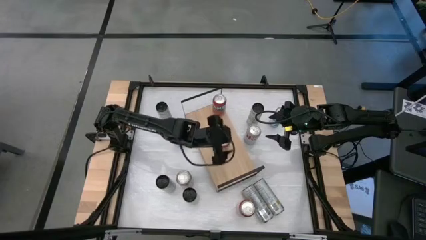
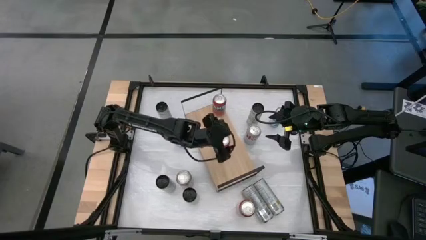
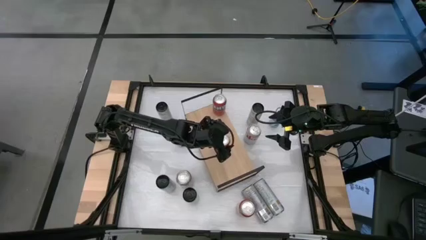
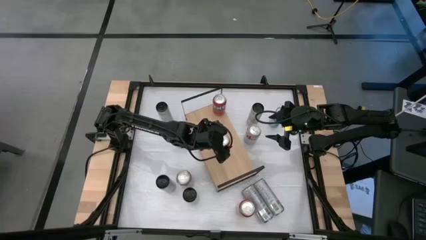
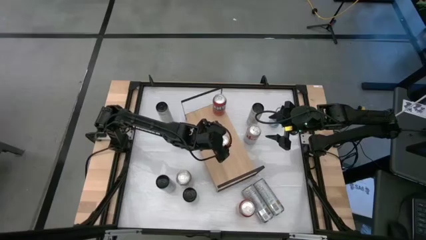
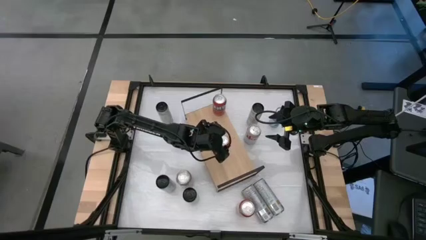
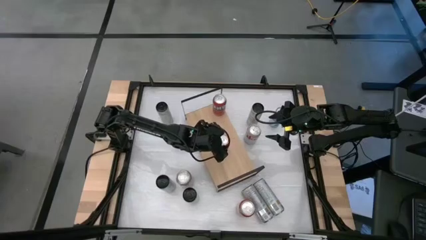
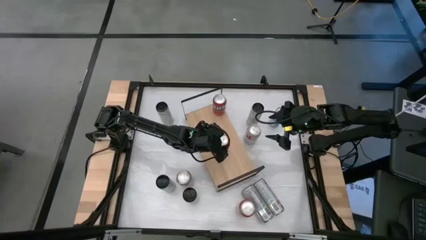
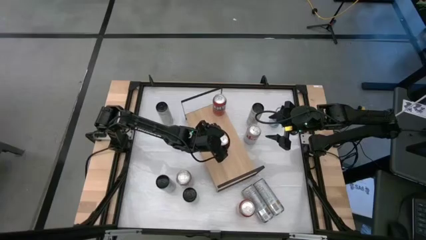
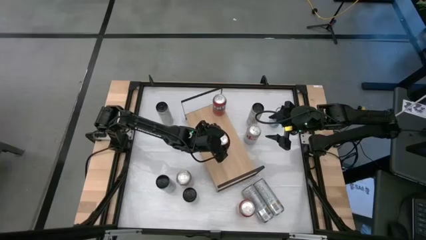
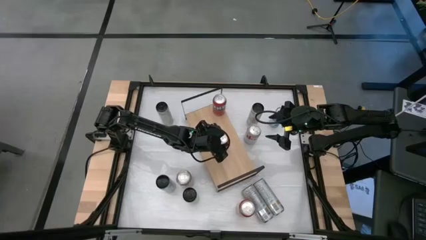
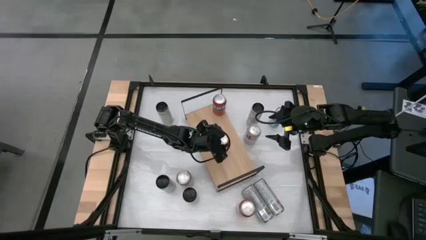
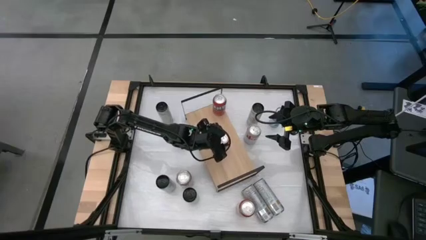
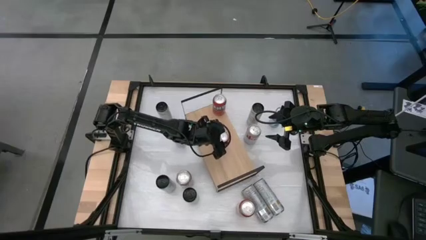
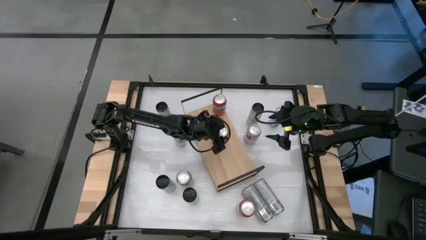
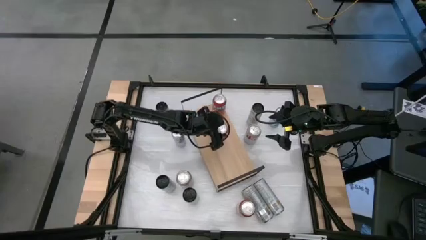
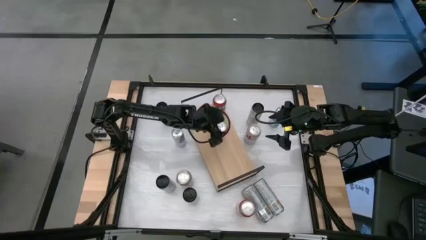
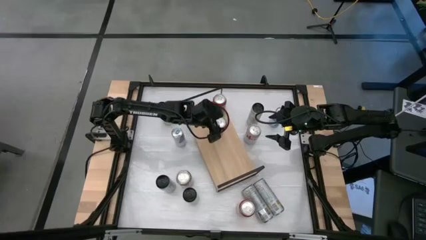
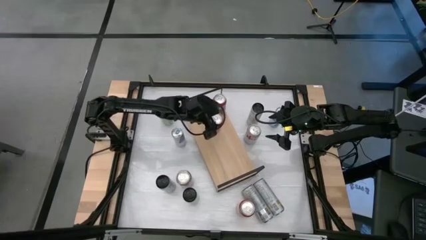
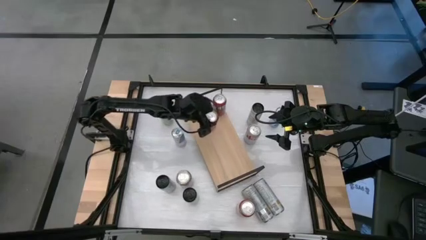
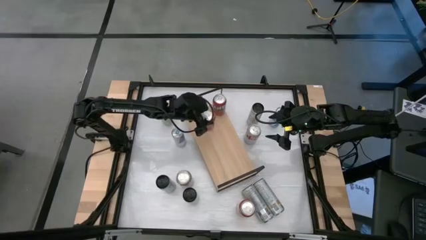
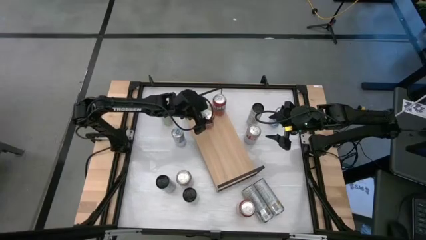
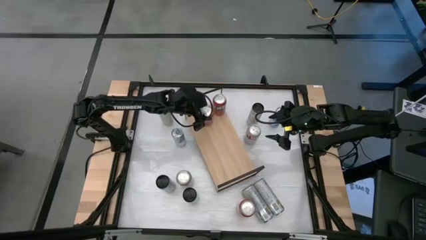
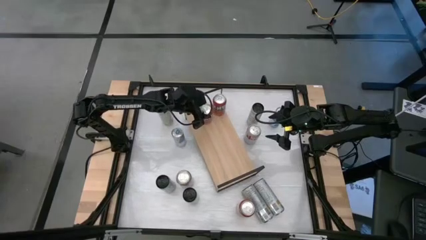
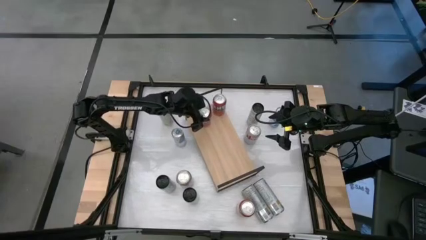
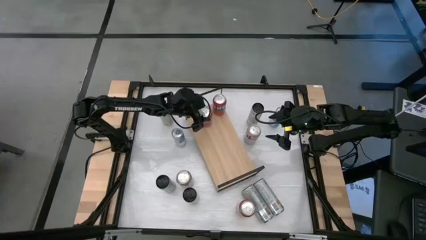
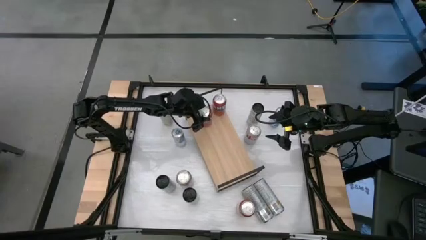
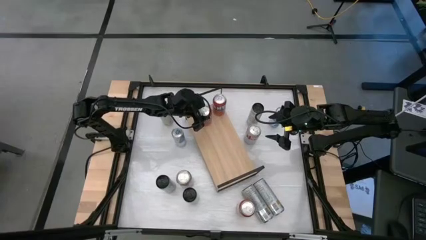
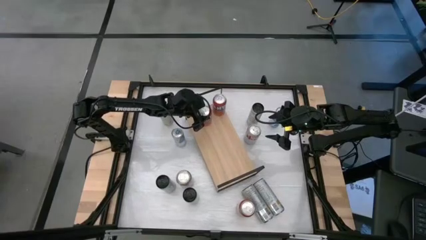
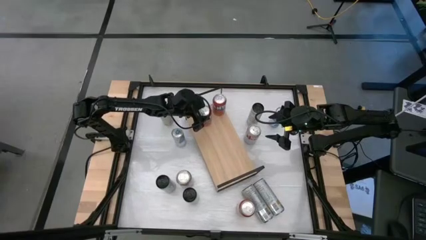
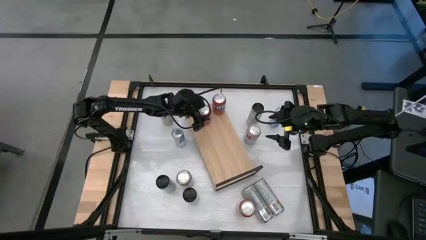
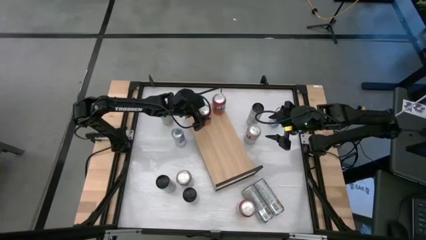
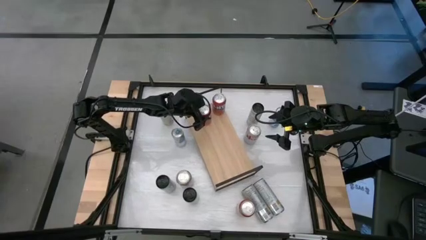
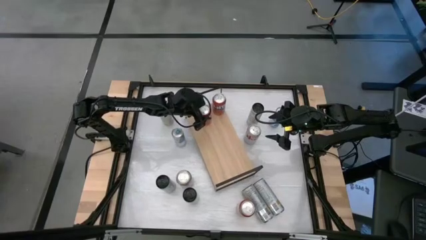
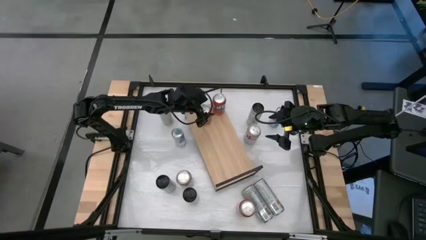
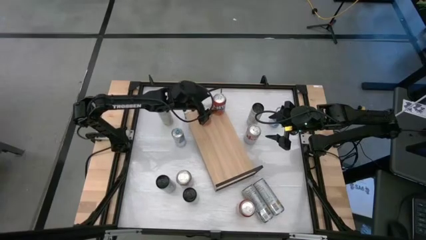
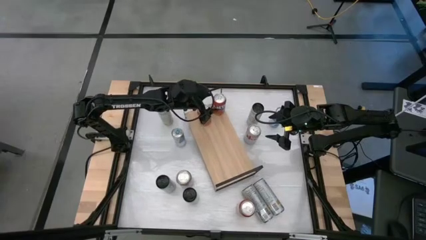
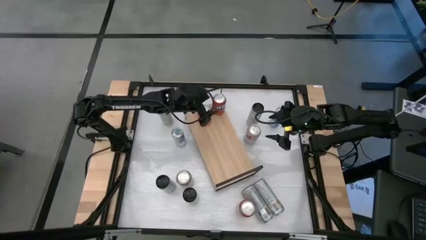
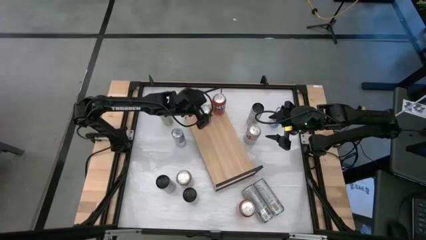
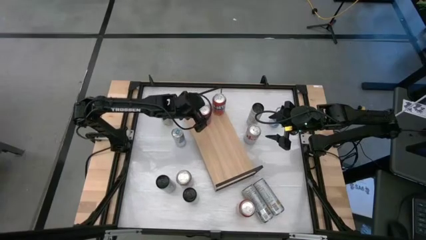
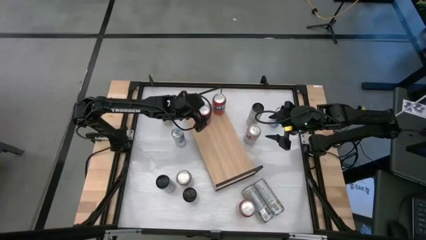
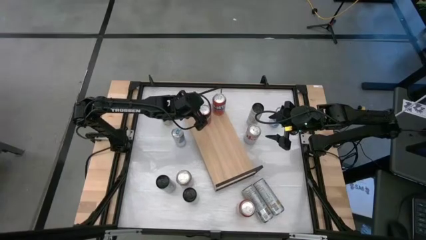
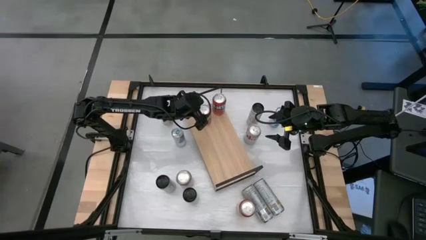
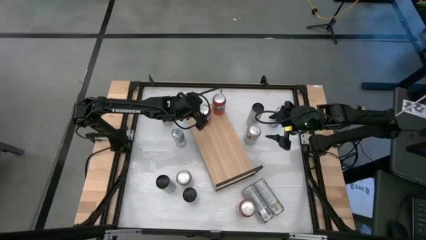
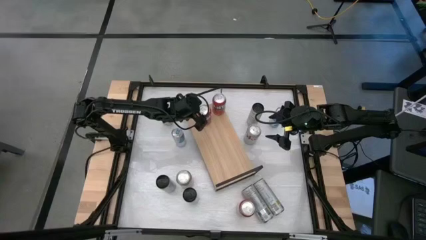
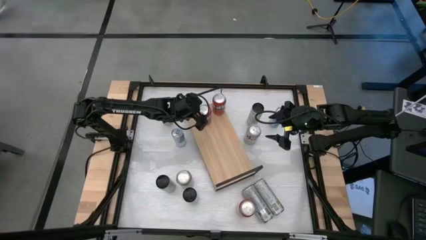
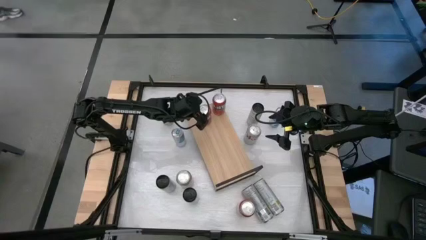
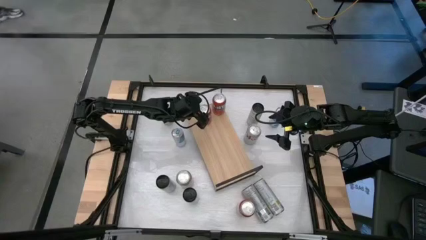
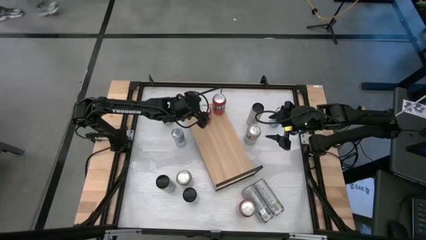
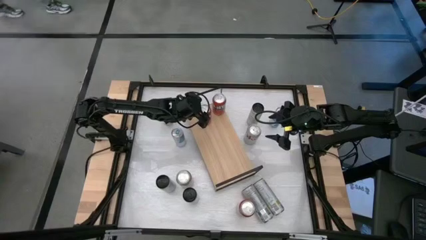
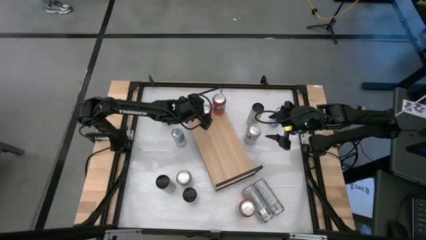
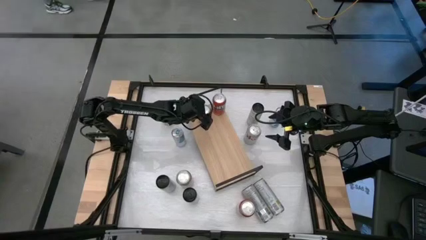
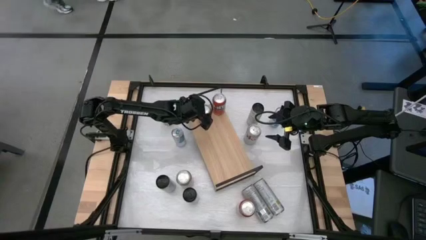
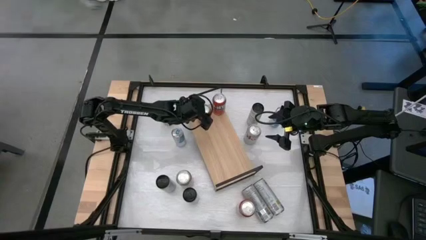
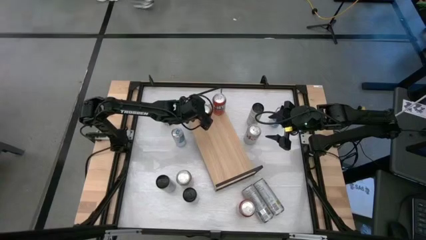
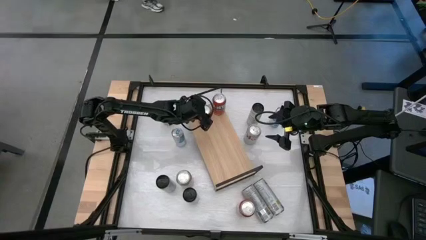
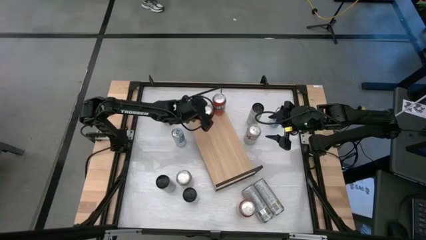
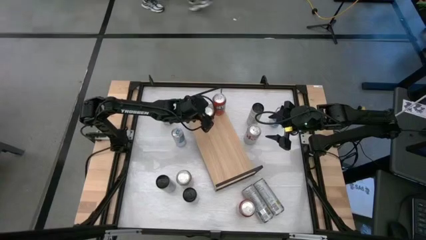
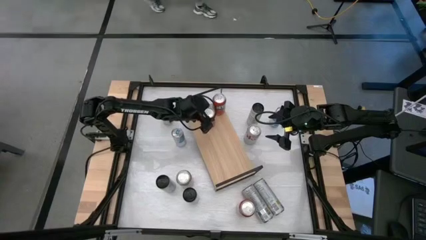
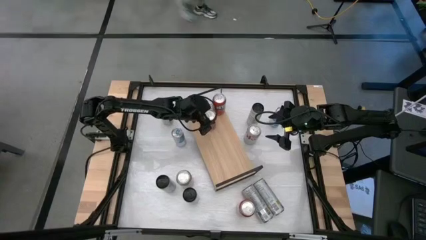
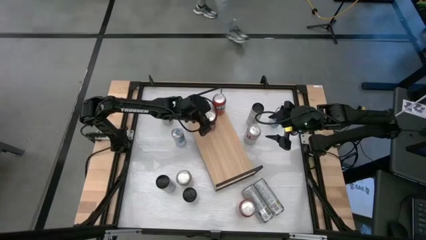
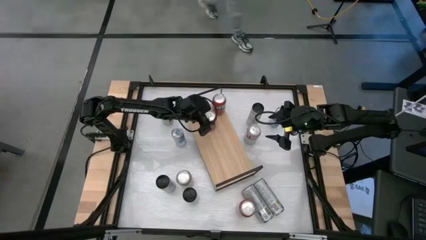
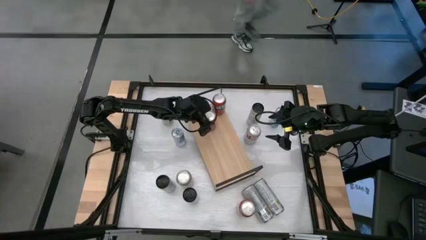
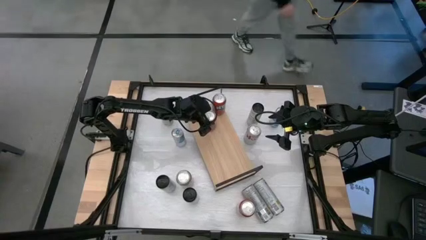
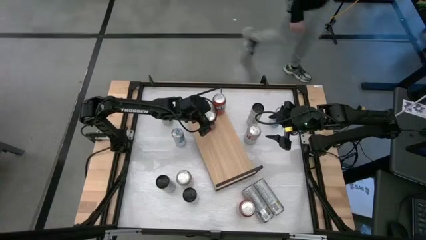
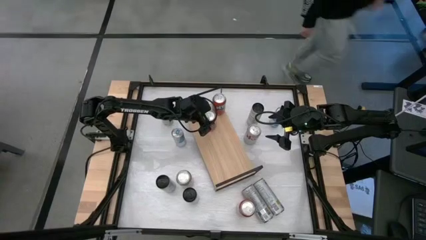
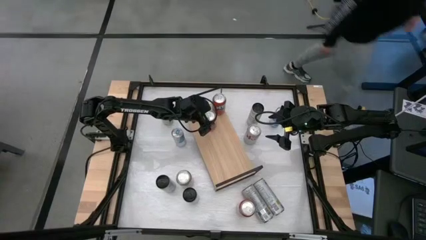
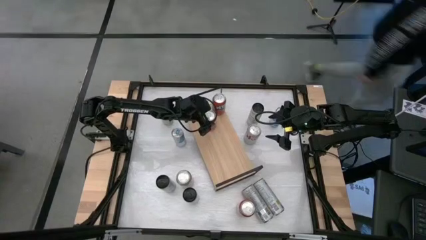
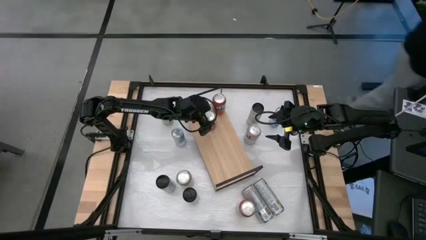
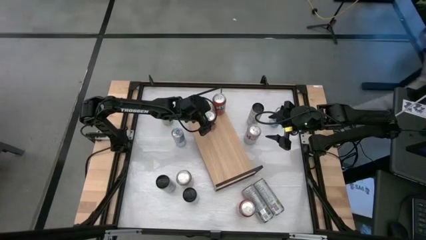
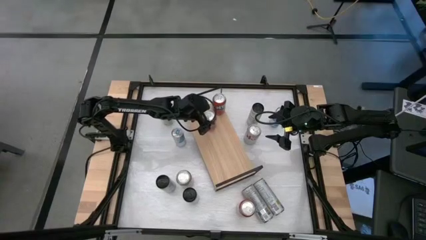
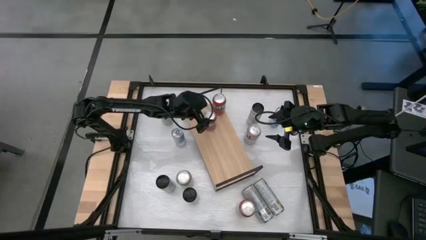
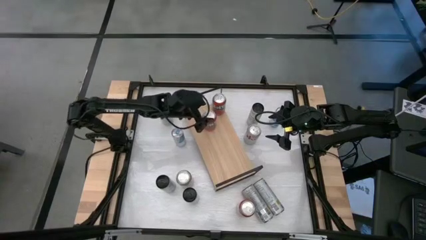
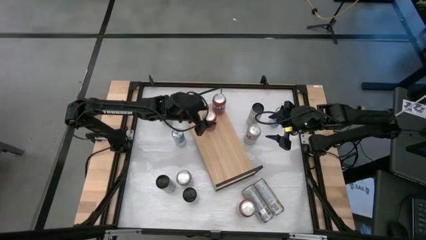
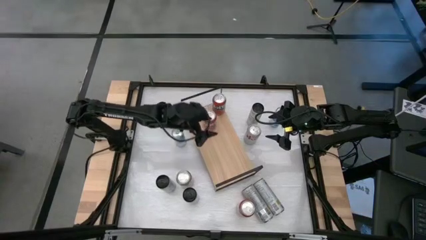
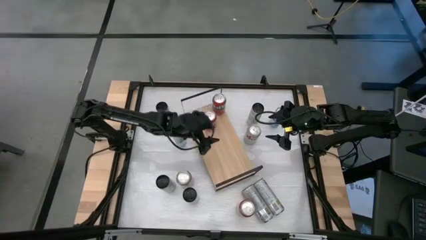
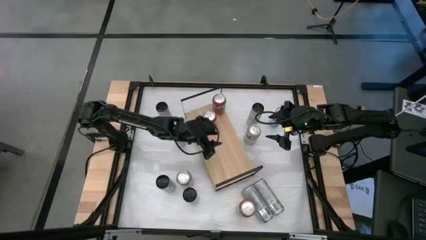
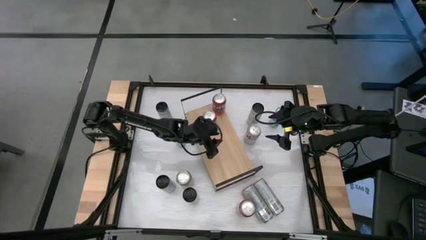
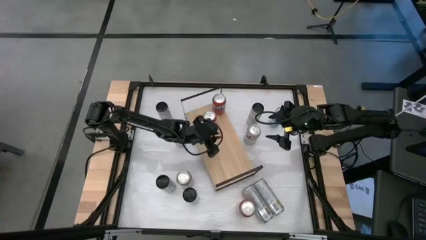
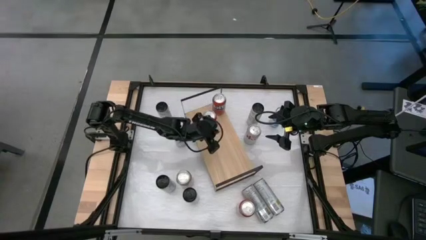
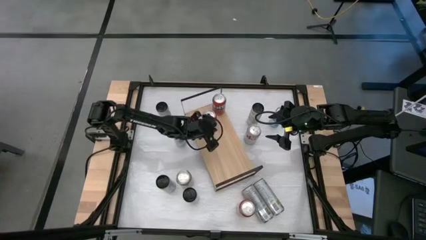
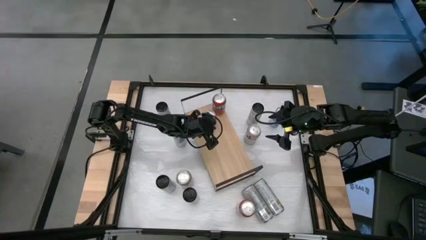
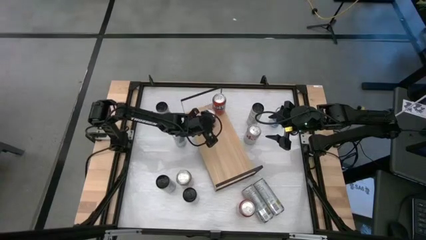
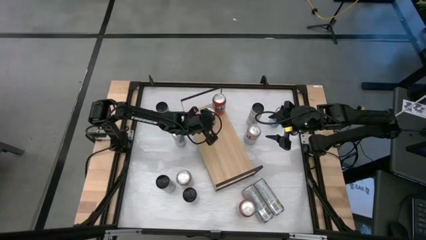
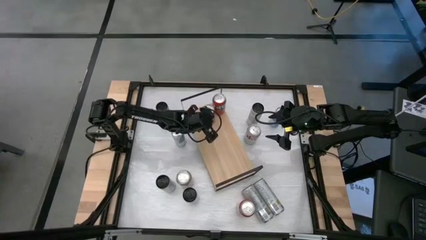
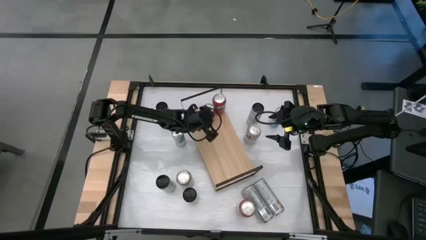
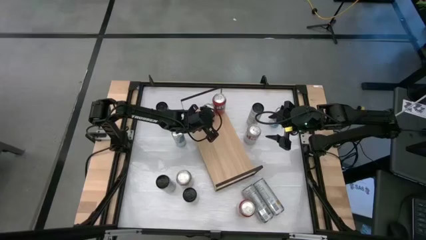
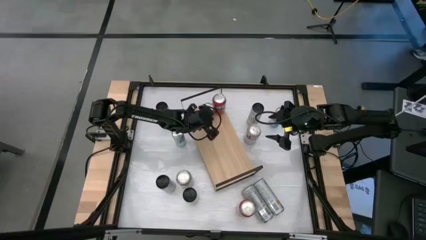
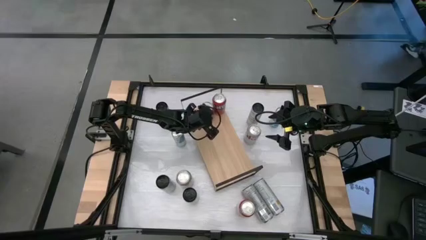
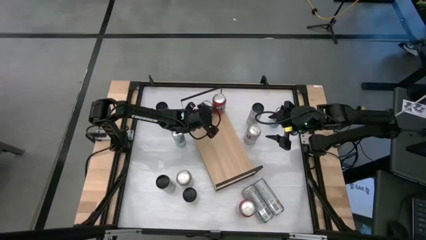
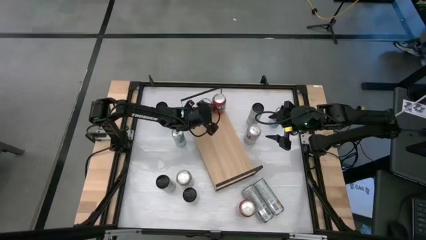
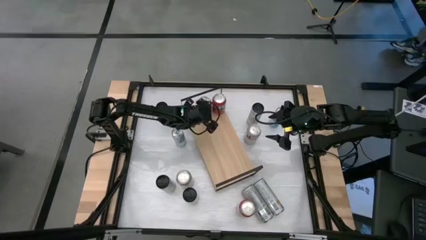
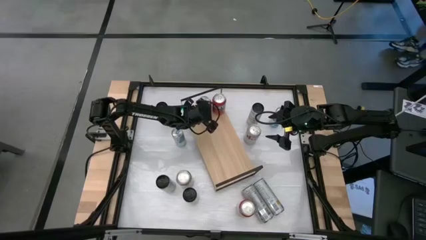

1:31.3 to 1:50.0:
Task: Place canned beverage on shelf
Align the left orange soda can with the other orange soda can
